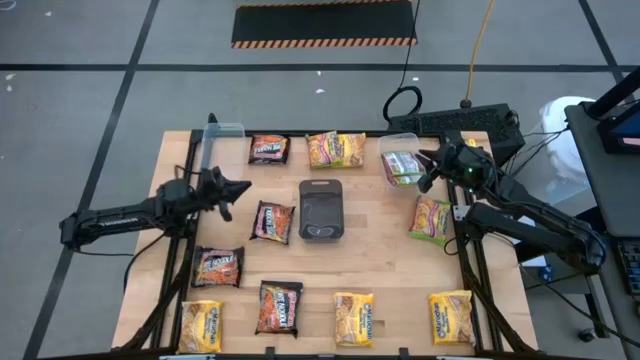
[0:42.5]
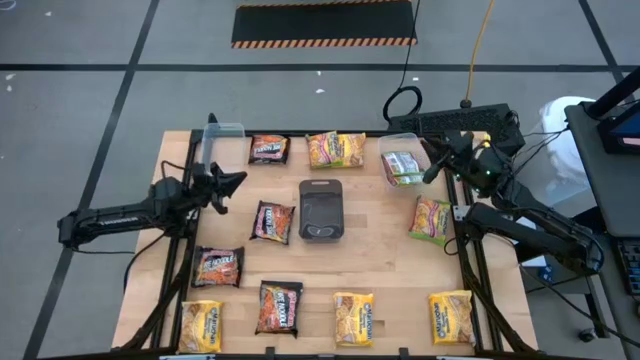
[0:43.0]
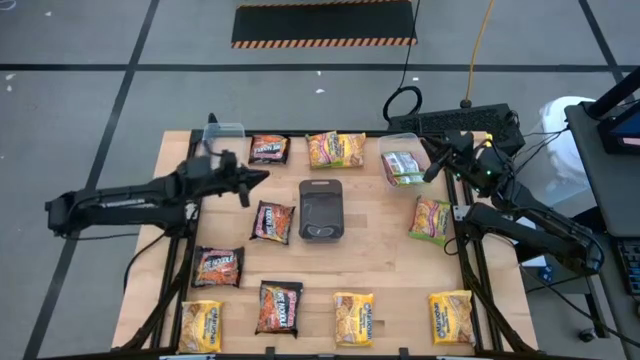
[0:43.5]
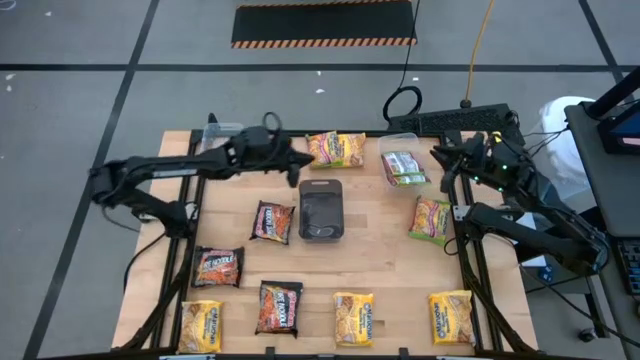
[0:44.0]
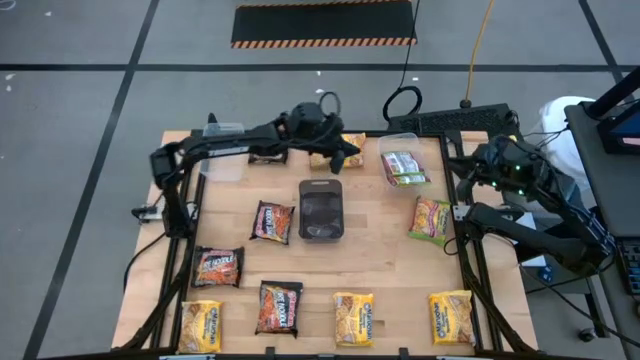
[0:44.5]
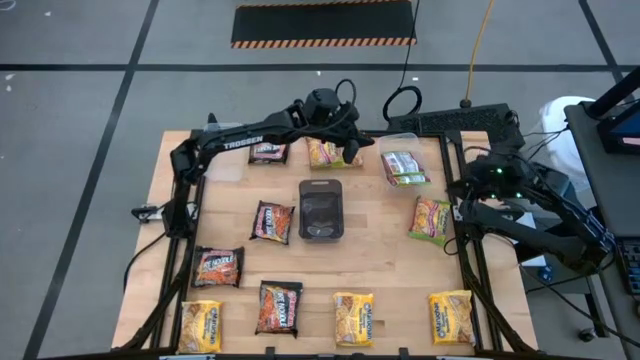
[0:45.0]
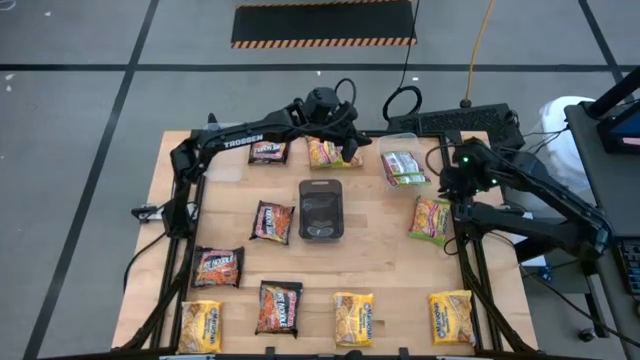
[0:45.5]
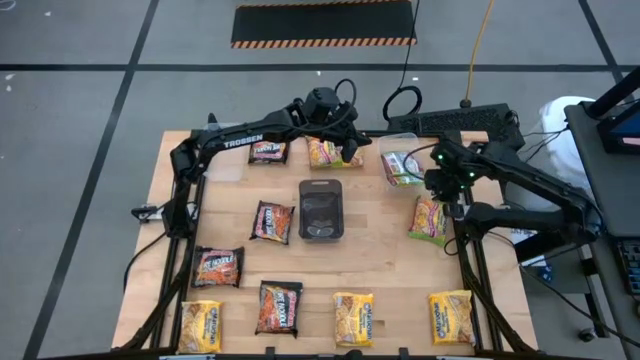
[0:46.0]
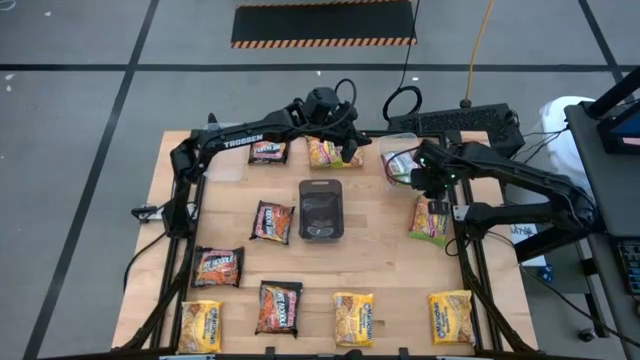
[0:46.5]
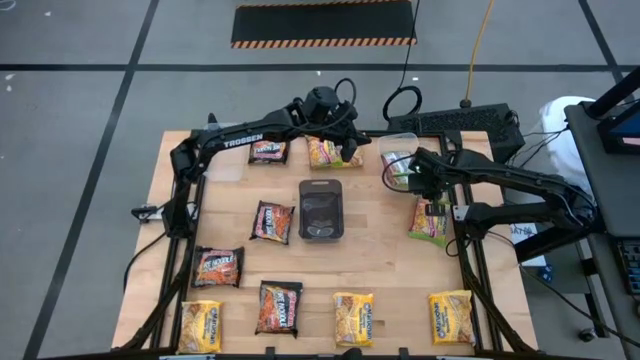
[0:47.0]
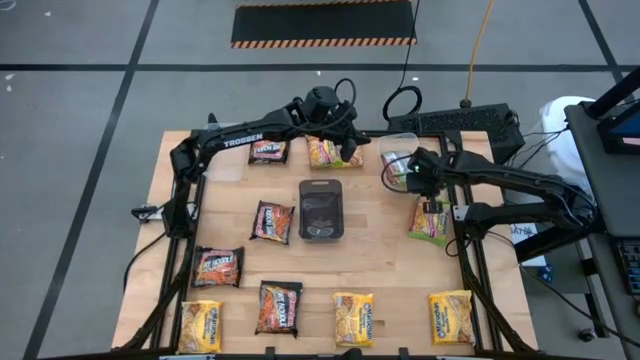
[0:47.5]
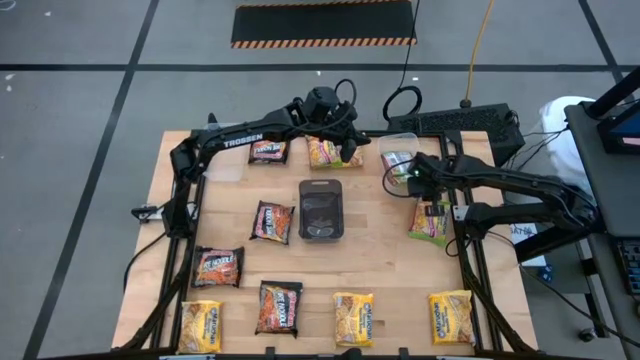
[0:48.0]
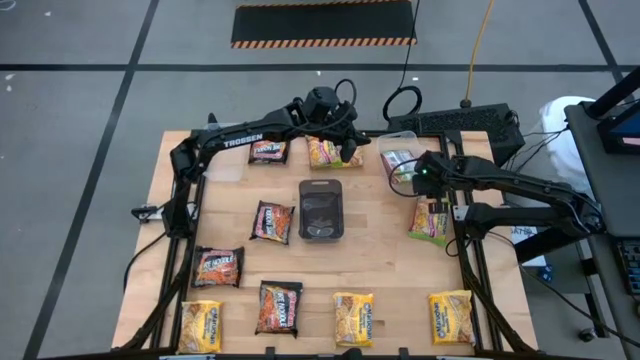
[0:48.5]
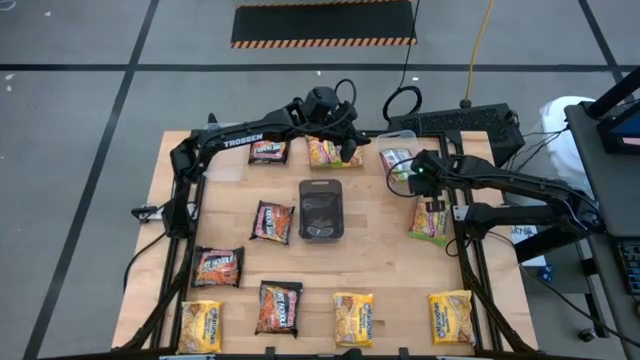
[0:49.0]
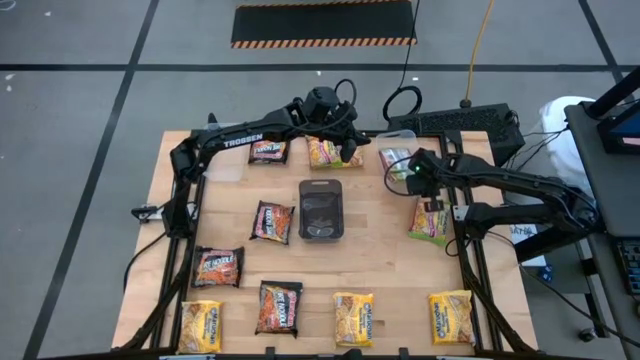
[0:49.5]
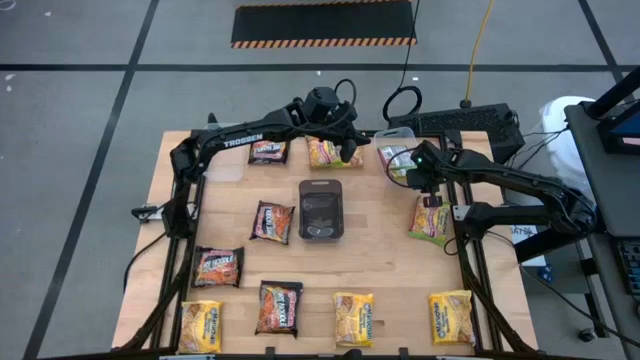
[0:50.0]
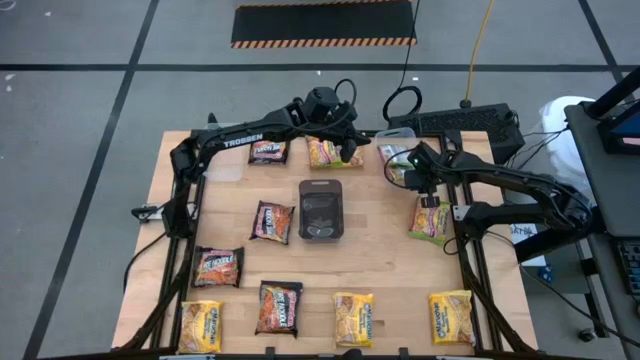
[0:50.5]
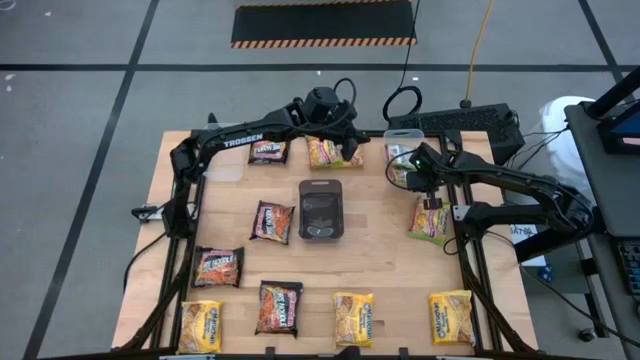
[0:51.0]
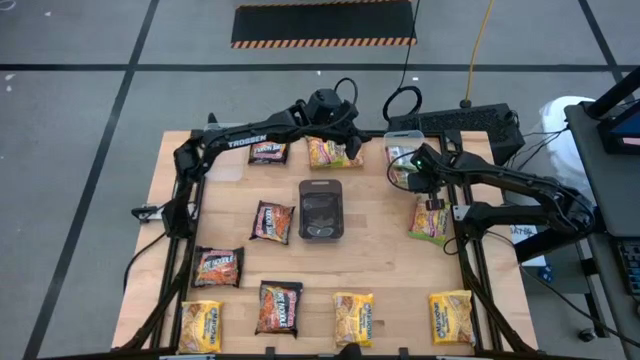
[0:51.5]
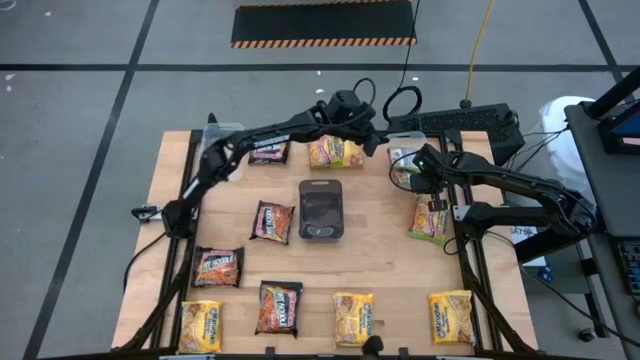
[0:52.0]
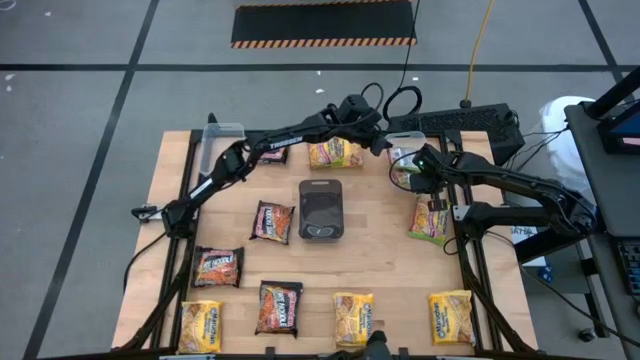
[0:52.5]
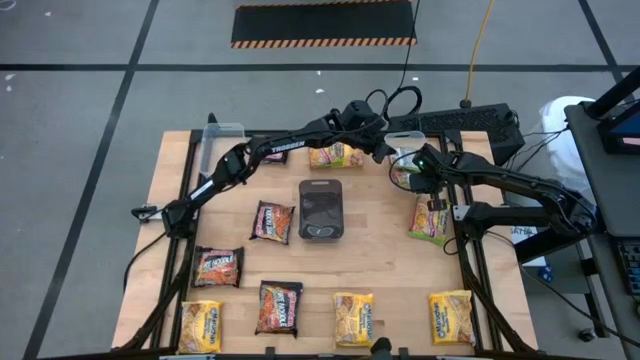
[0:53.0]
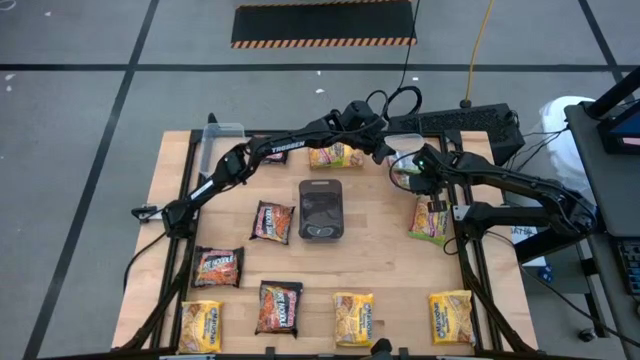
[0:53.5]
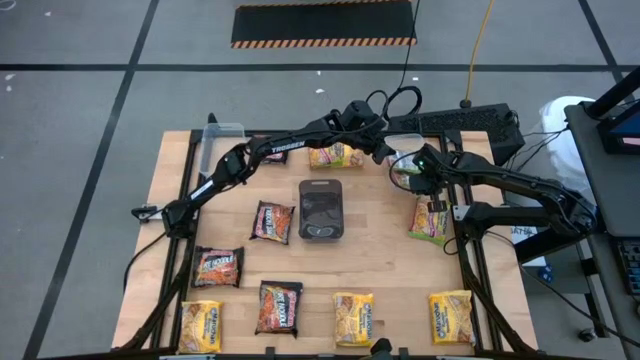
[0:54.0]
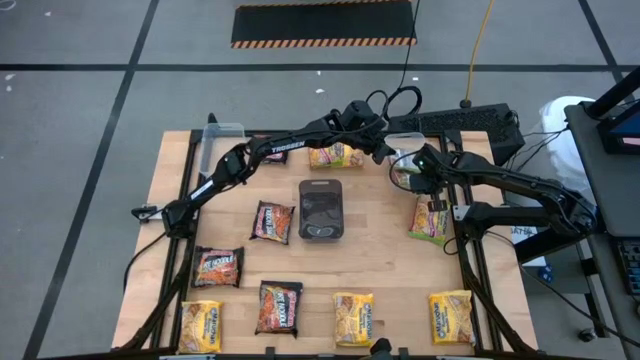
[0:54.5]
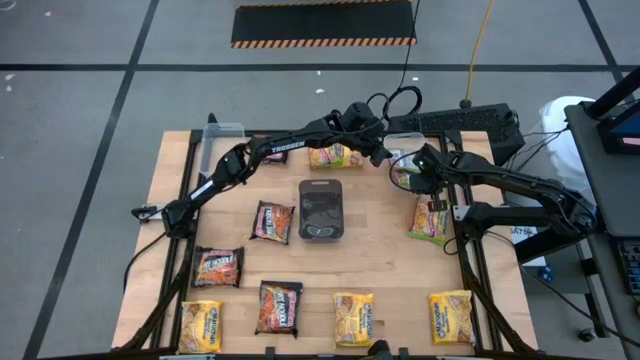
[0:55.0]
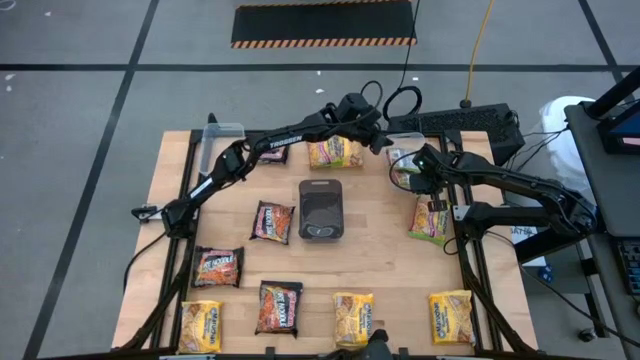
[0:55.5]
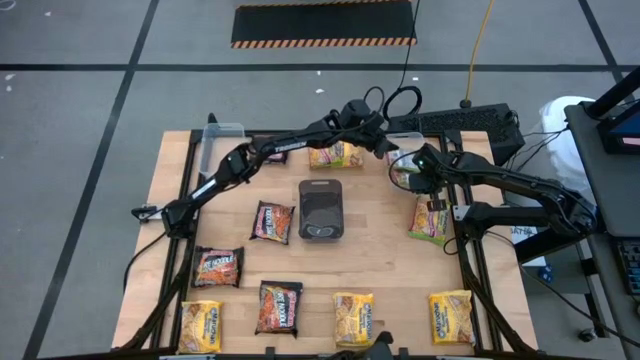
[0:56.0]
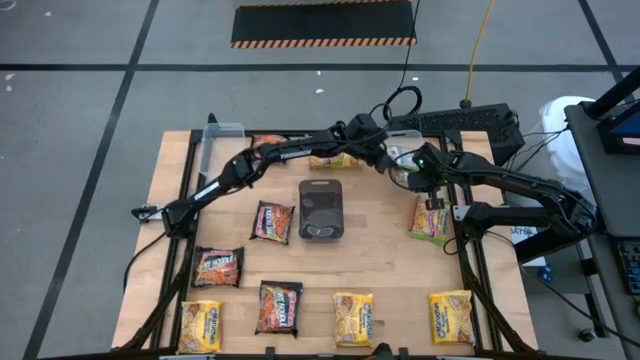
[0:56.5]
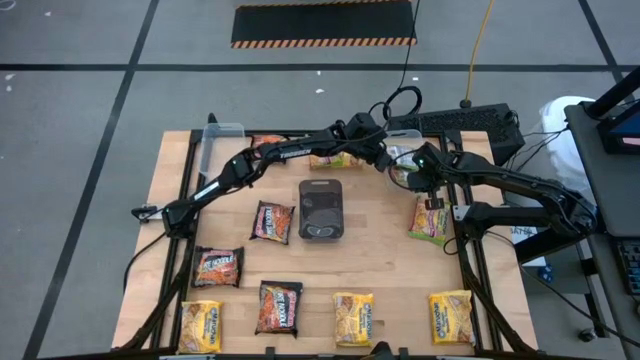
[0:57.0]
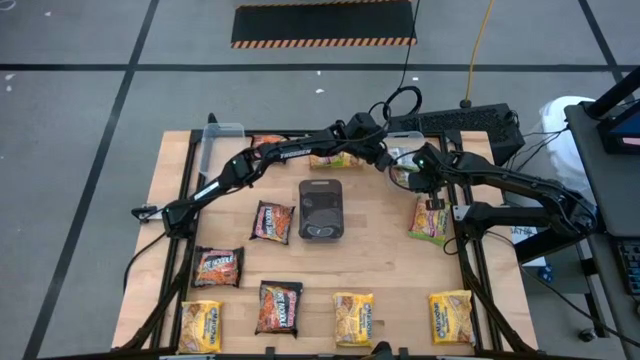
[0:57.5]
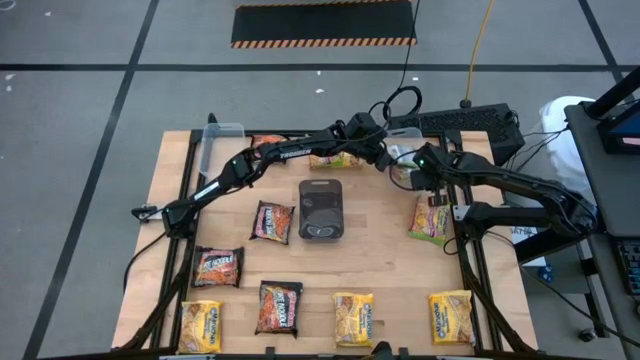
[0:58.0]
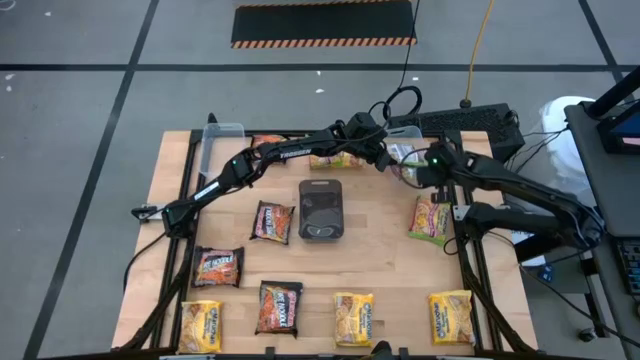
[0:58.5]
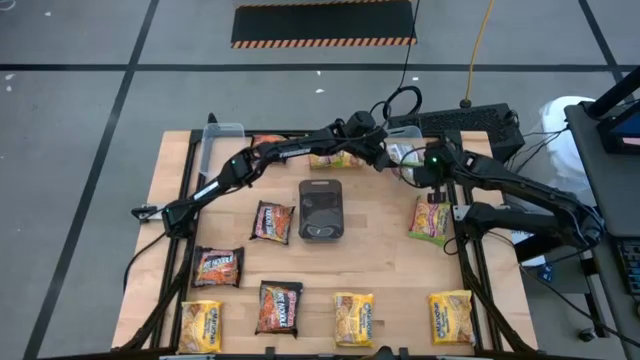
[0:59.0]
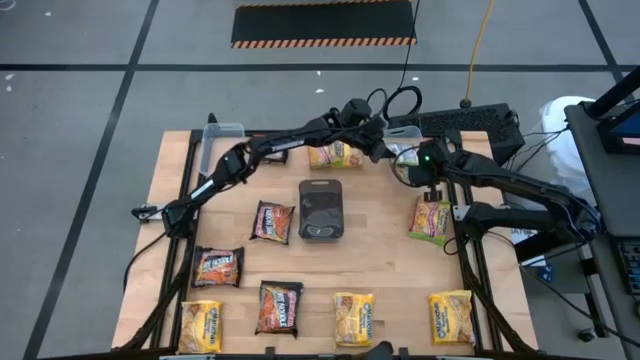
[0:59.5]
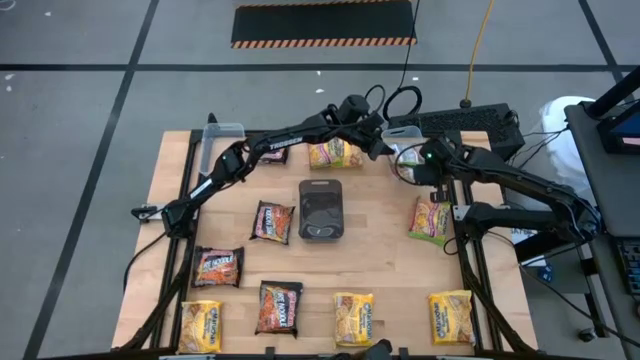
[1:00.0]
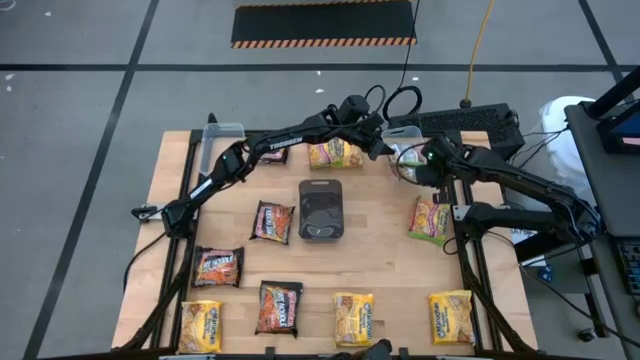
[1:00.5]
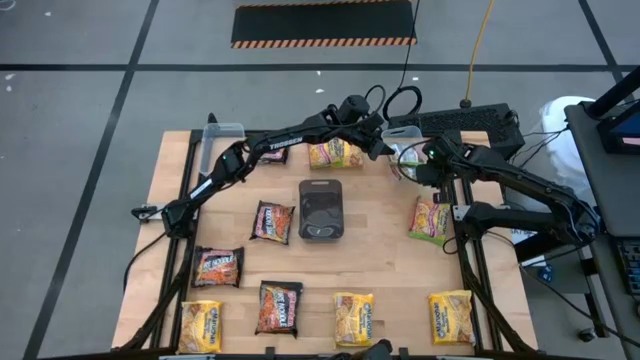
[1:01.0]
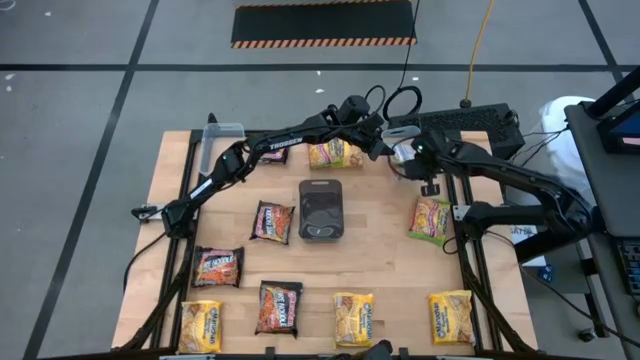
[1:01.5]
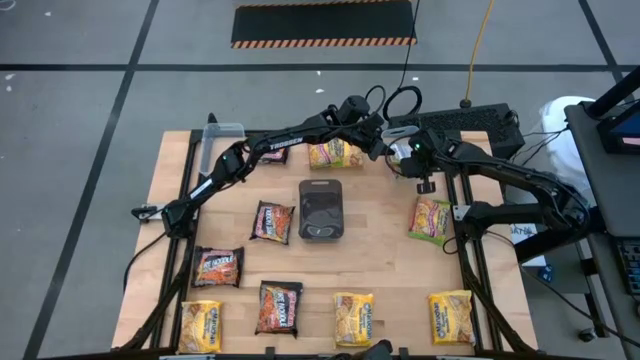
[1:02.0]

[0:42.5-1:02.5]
Task: Sort Maruchan noodles
Adjust the green noodle pack
